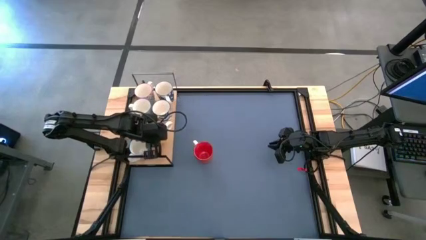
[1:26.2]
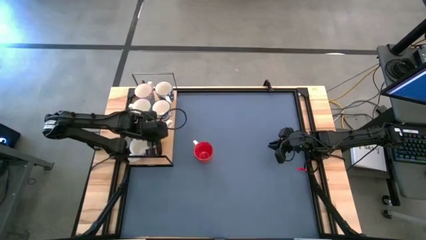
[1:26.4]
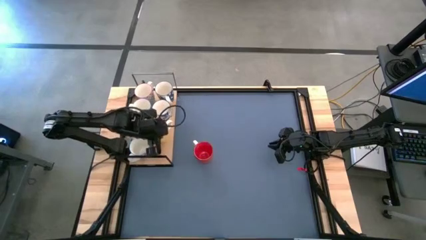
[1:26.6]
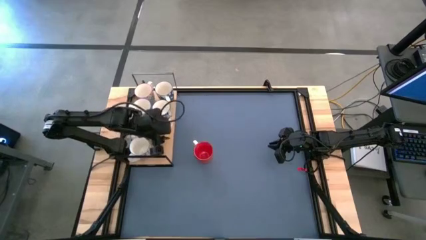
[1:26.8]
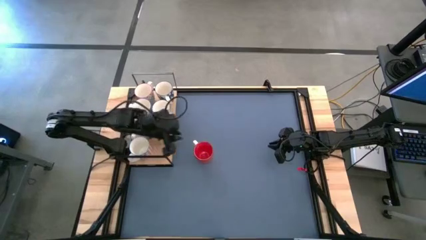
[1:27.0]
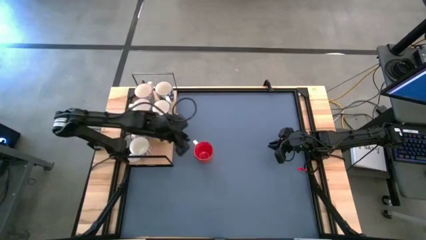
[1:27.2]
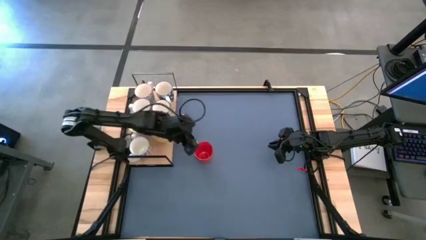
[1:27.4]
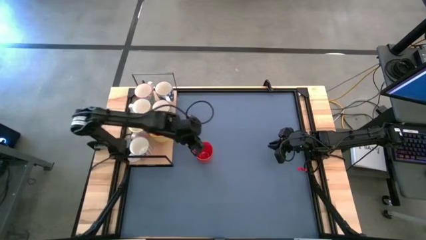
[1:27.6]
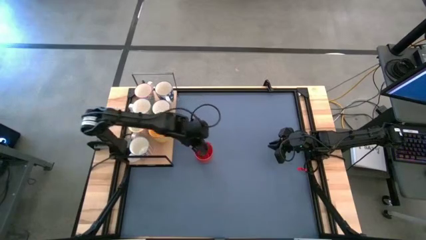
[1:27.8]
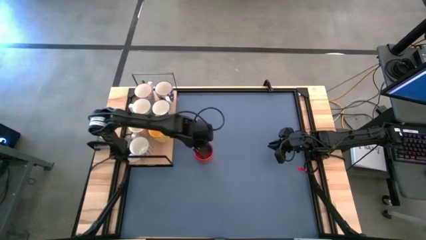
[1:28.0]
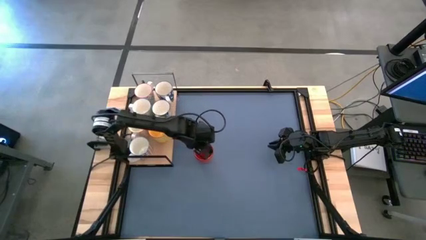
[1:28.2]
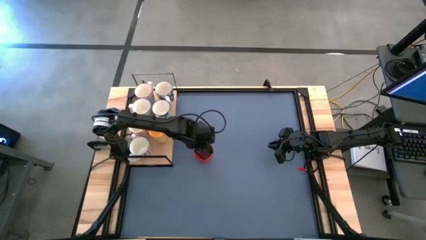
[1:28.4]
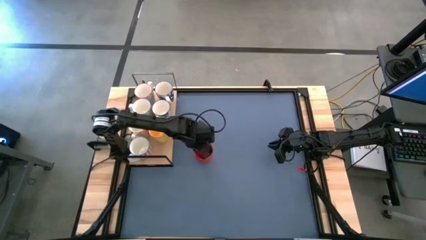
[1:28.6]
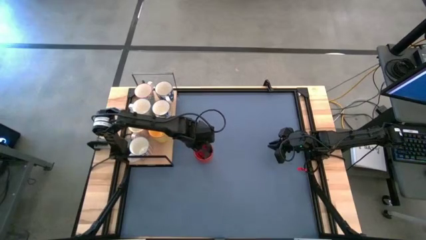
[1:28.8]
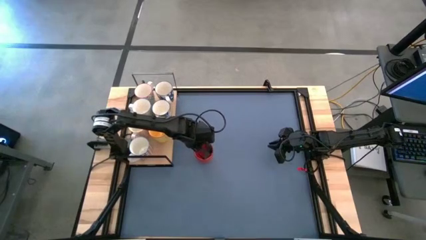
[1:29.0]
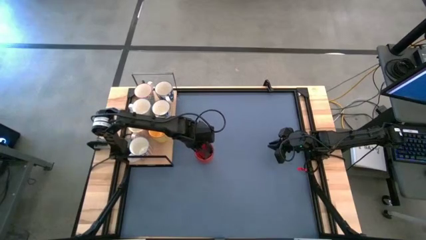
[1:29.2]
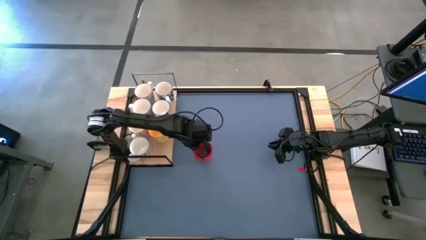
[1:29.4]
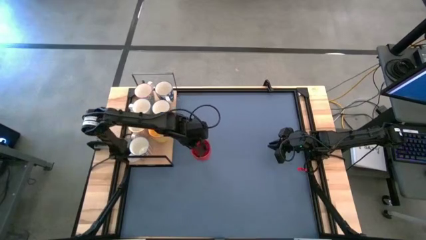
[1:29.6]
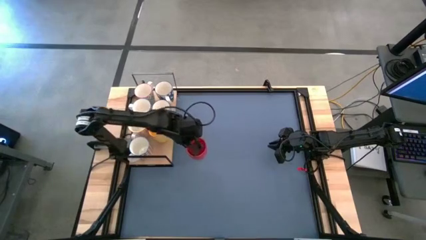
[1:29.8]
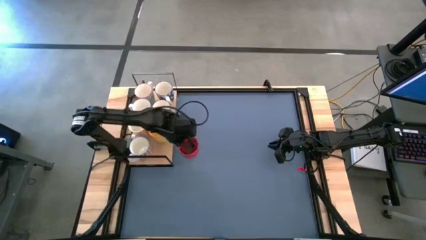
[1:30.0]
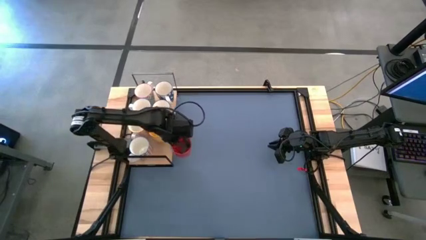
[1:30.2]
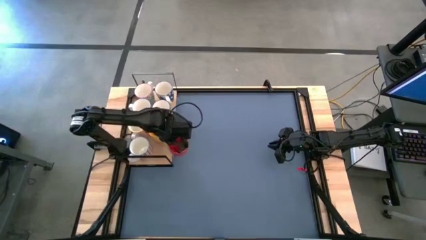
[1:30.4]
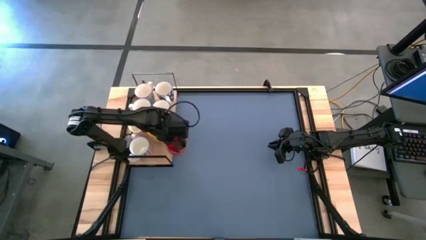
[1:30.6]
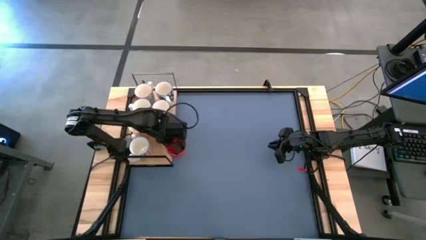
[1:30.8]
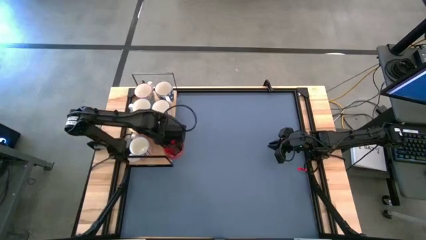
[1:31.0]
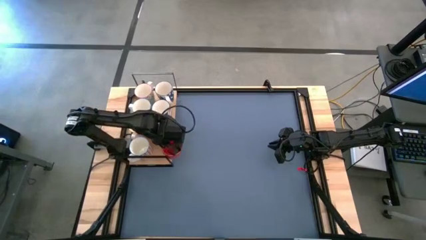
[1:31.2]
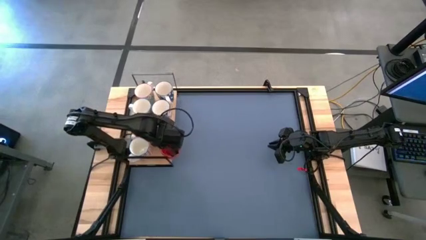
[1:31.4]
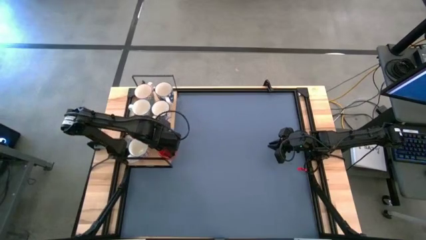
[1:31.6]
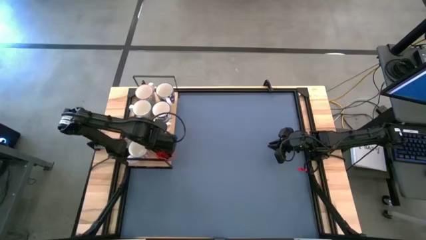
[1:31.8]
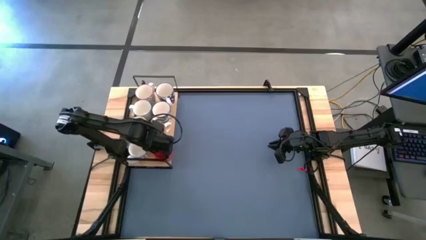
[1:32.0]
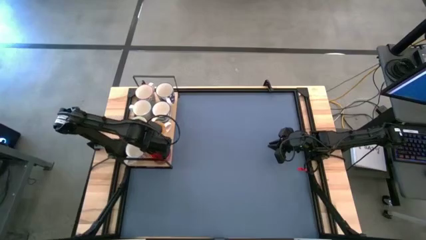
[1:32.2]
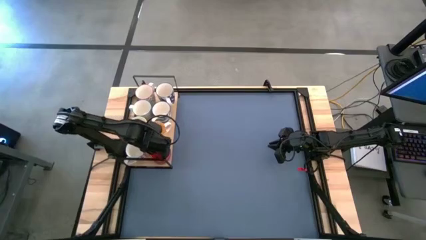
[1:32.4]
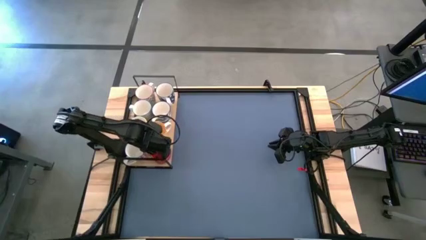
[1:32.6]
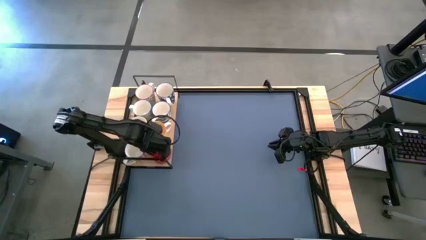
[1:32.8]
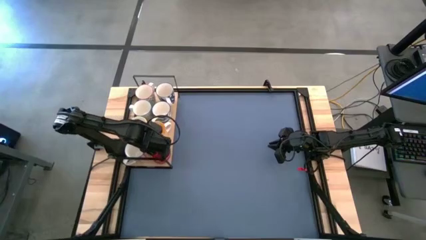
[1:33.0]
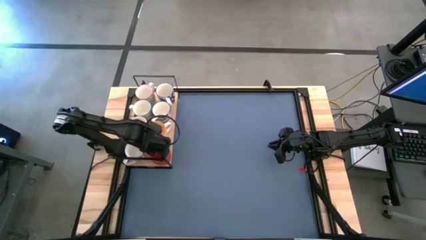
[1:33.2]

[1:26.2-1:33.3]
Task: Place coffee mugs
Put the orange mug on the shelf

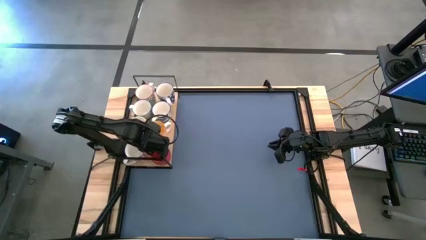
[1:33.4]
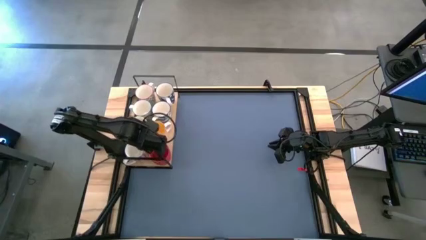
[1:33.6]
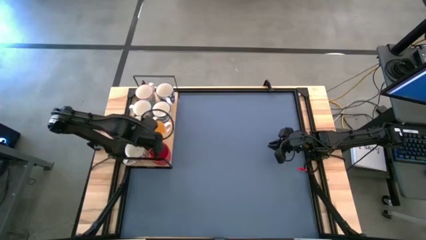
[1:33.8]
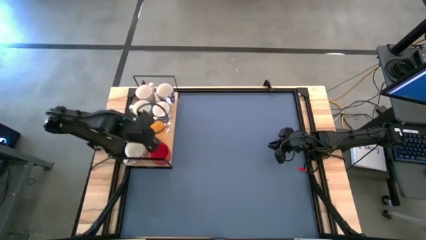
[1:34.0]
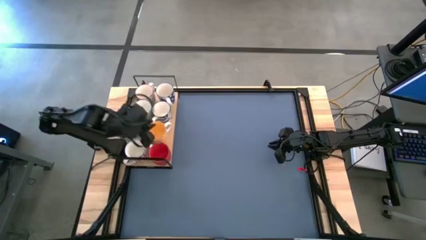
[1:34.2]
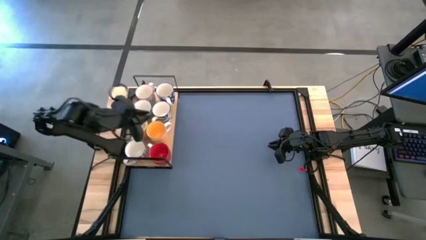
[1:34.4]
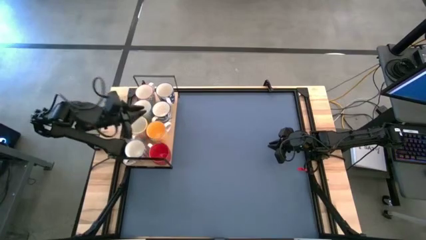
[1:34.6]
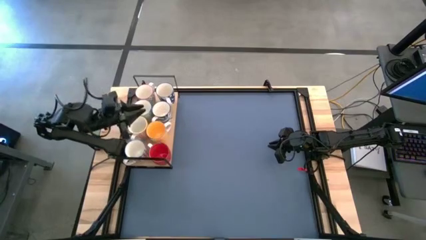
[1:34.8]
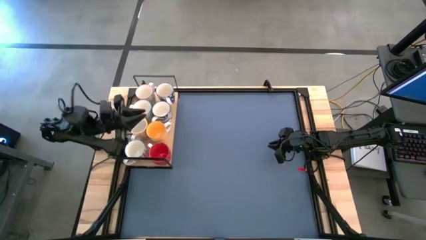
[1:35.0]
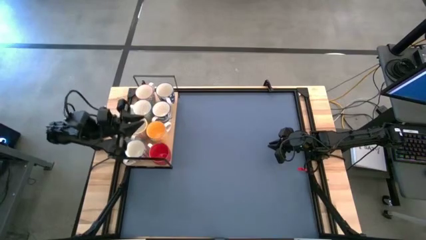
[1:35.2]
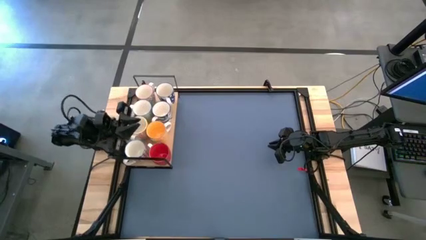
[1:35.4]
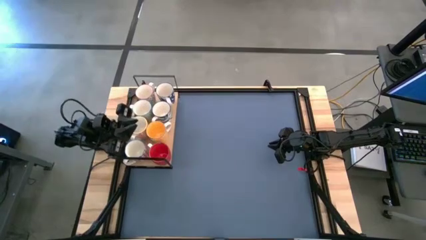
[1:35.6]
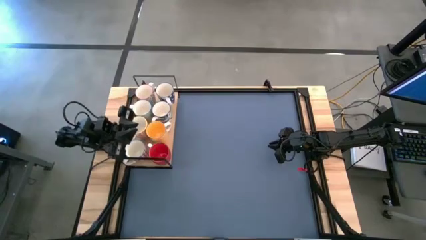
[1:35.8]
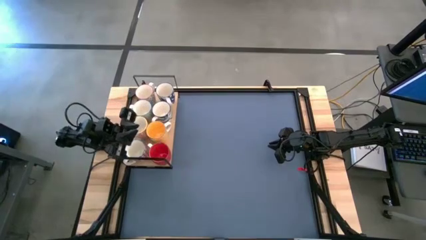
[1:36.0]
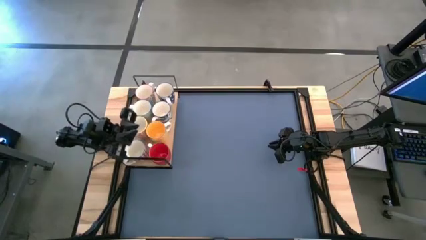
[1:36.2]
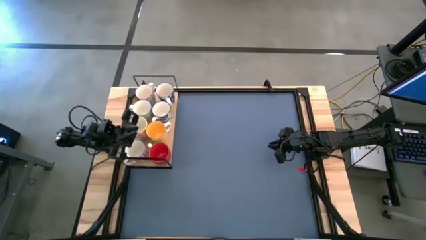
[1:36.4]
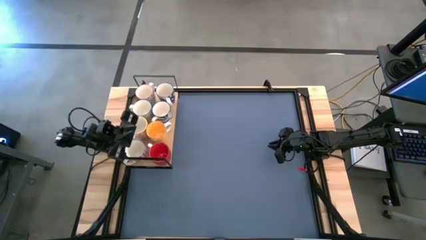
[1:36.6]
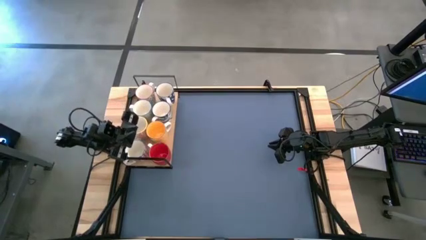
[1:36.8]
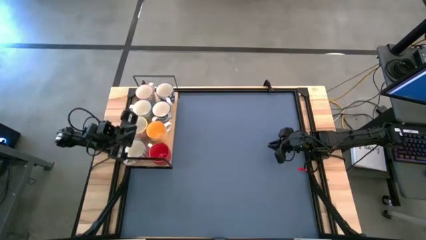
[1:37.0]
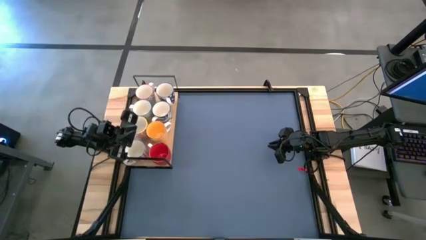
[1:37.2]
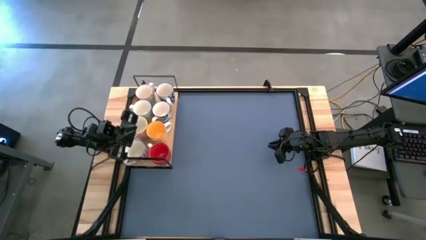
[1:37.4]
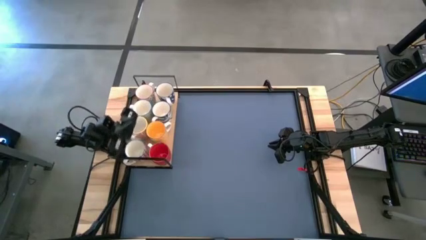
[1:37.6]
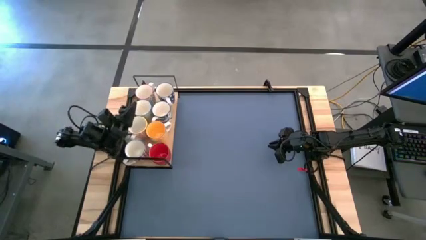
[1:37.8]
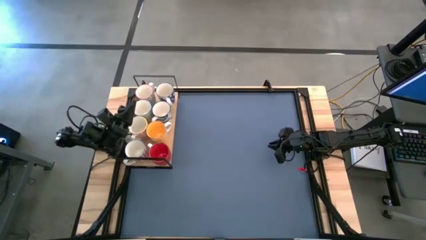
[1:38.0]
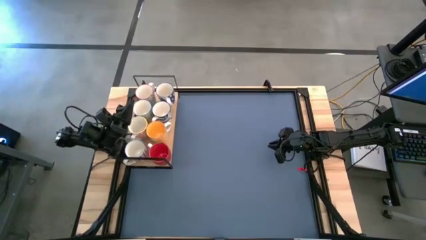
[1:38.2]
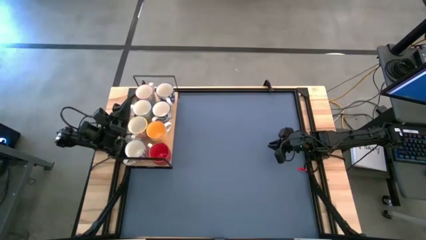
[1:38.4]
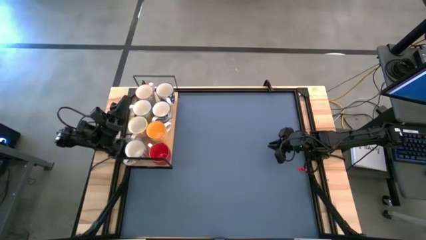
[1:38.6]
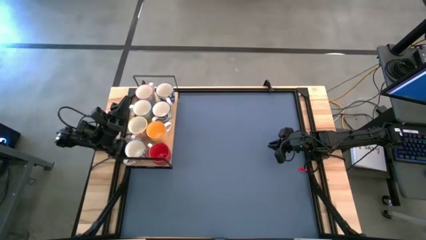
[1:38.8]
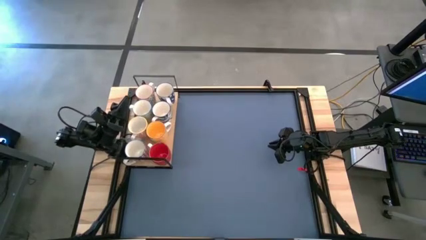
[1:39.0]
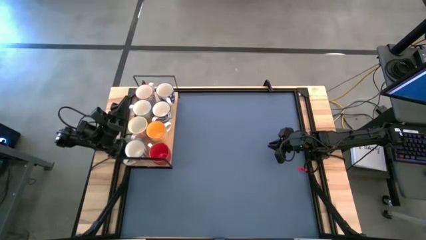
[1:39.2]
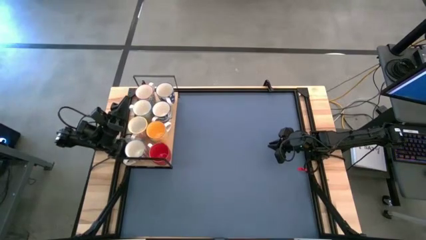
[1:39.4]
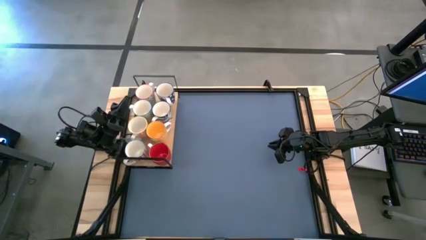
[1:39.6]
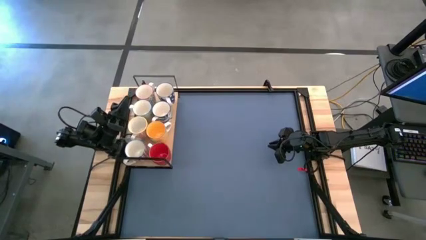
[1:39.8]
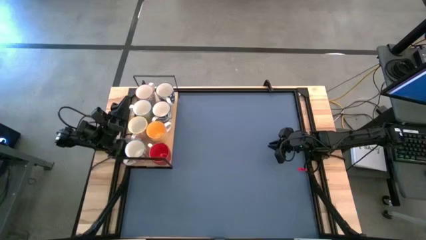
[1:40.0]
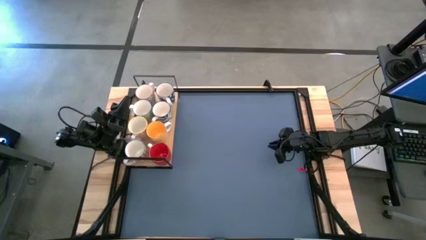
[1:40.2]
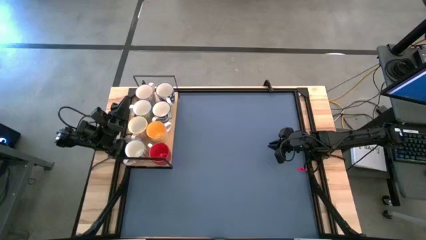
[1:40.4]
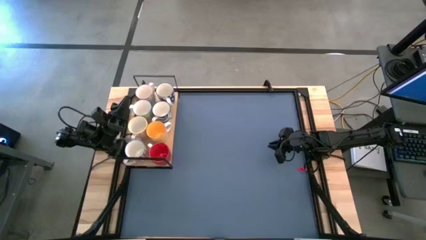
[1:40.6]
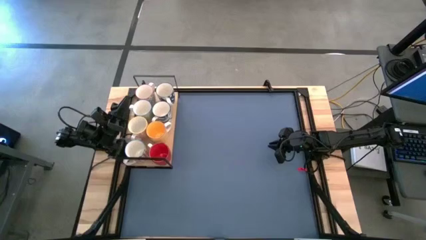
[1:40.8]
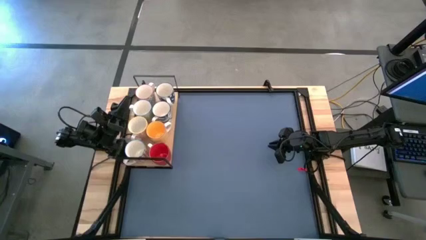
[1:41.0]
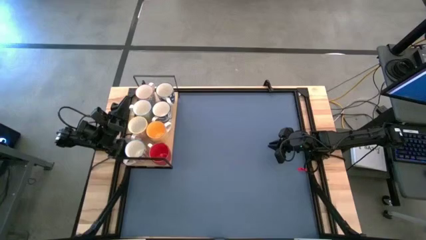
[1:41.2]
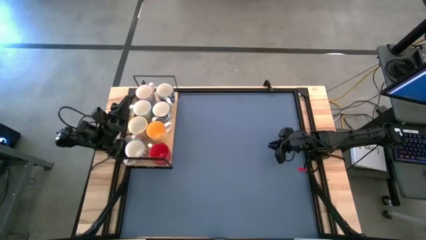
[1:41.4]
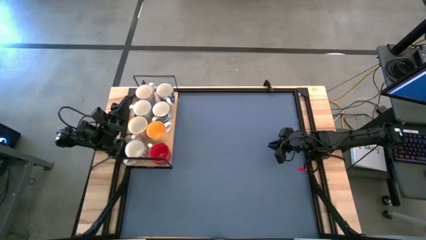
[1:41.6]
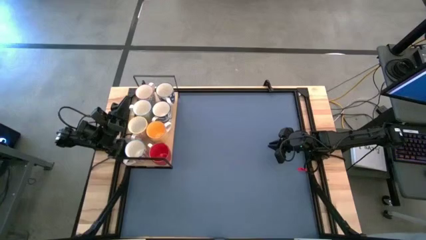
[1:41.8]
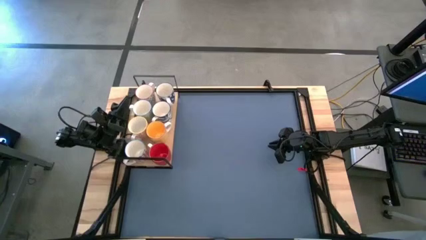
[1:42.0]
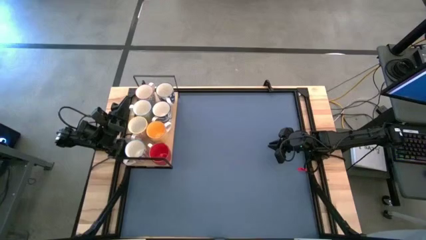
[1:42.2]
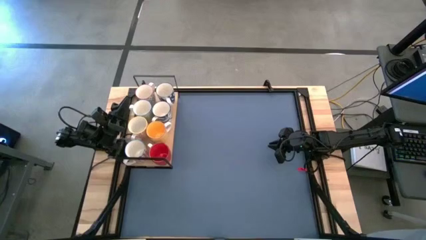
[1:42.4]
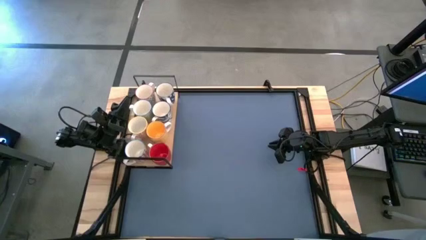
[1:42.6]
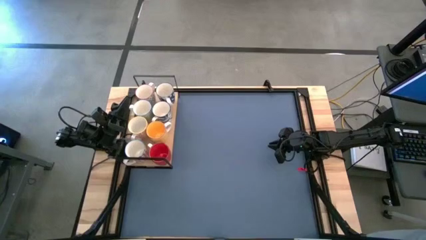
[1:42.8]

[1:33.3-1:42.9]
Return to Home Position
